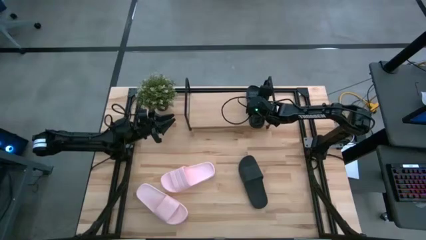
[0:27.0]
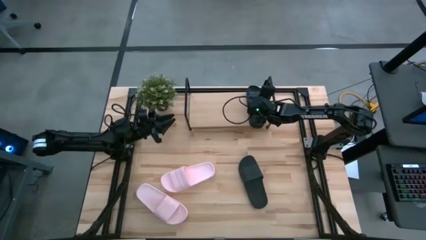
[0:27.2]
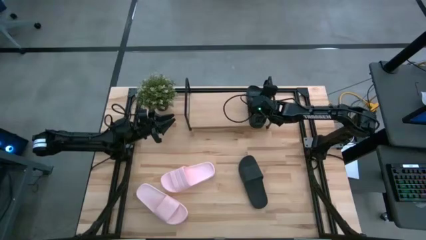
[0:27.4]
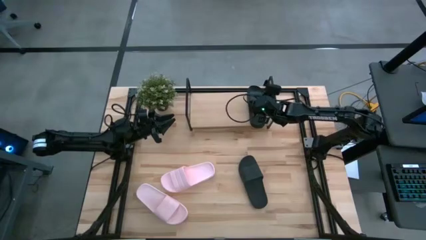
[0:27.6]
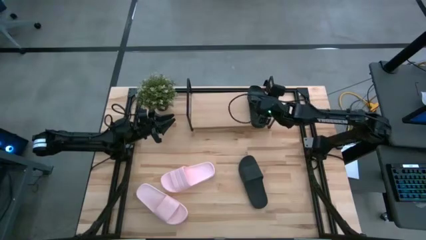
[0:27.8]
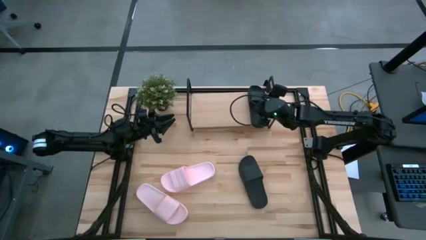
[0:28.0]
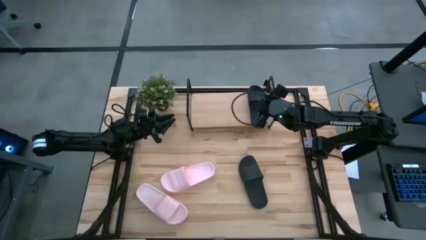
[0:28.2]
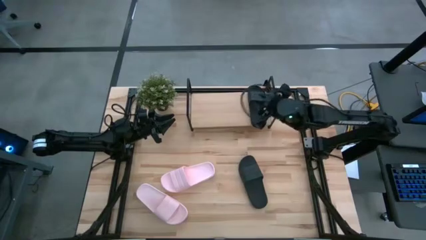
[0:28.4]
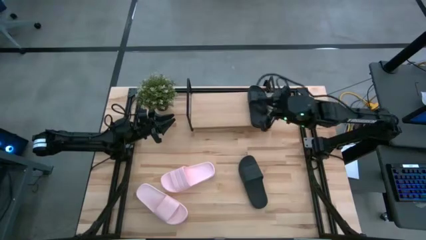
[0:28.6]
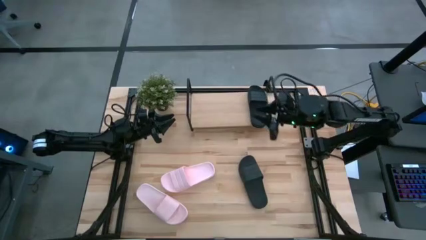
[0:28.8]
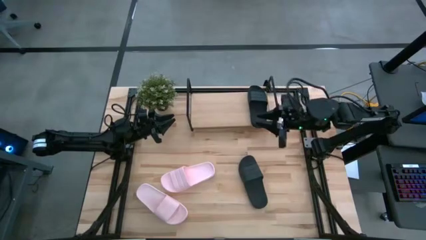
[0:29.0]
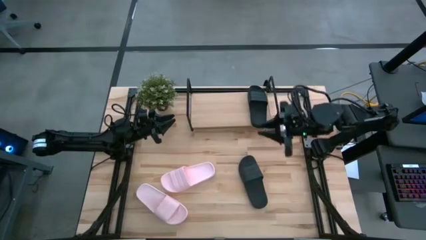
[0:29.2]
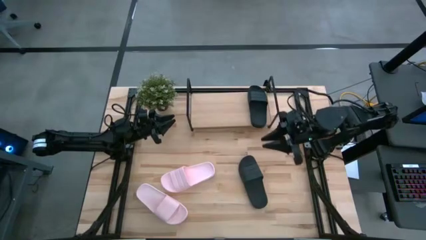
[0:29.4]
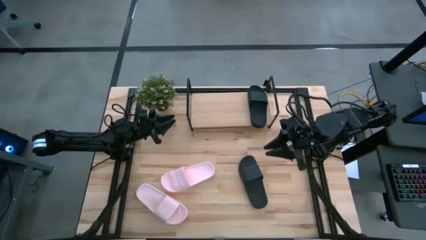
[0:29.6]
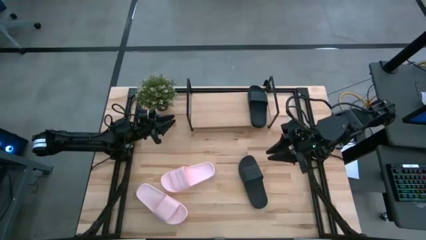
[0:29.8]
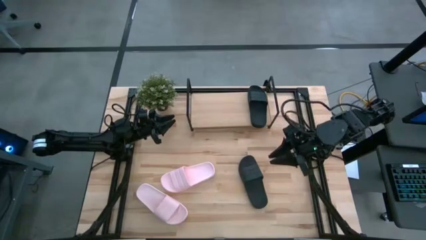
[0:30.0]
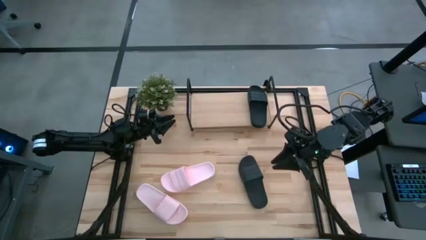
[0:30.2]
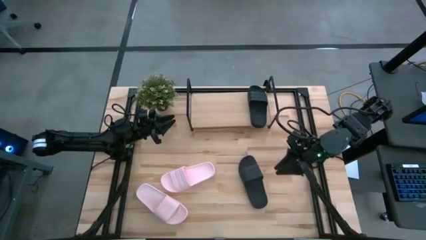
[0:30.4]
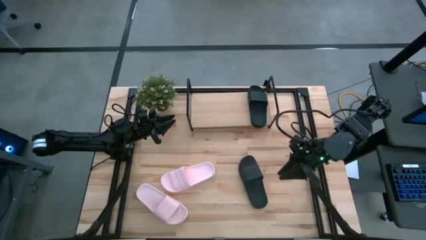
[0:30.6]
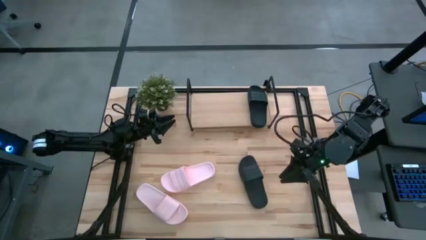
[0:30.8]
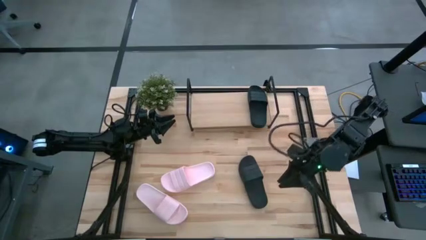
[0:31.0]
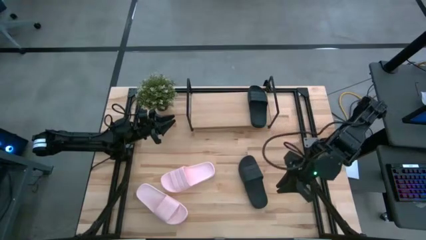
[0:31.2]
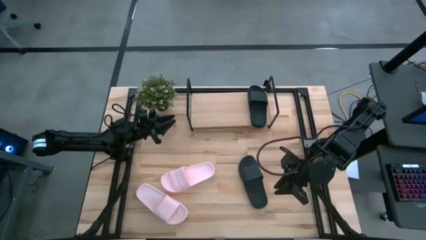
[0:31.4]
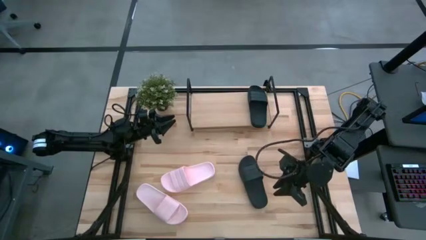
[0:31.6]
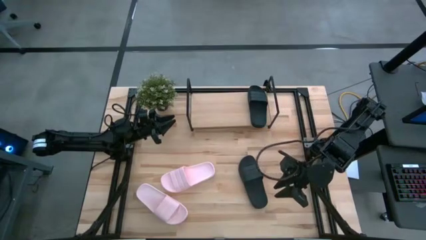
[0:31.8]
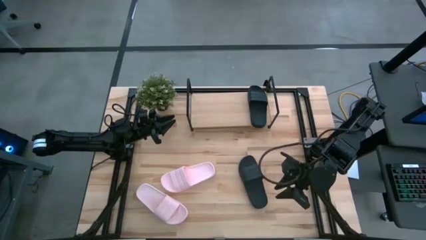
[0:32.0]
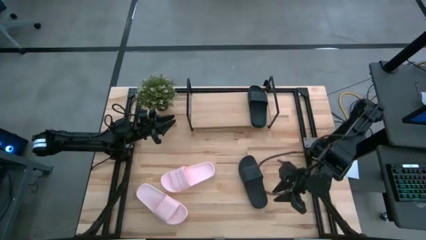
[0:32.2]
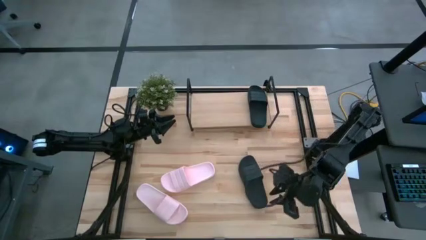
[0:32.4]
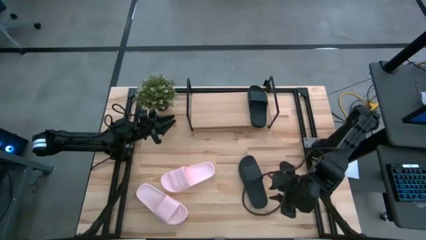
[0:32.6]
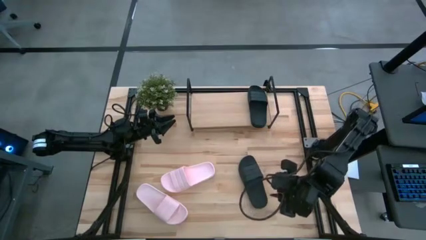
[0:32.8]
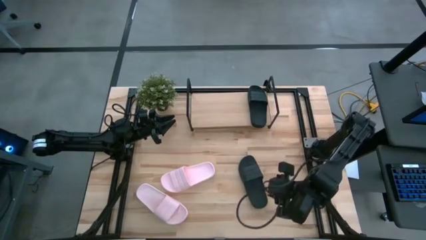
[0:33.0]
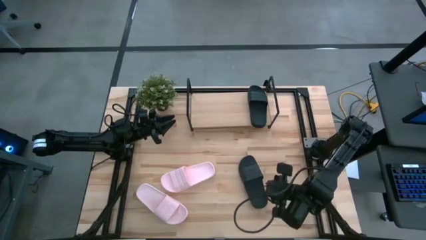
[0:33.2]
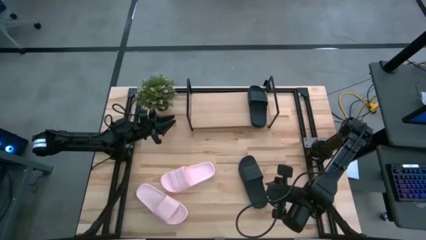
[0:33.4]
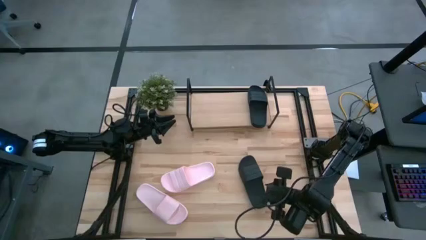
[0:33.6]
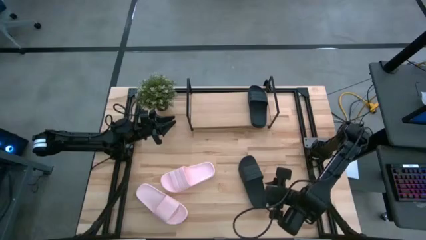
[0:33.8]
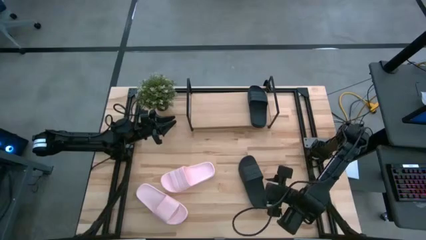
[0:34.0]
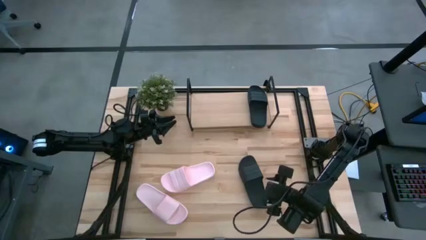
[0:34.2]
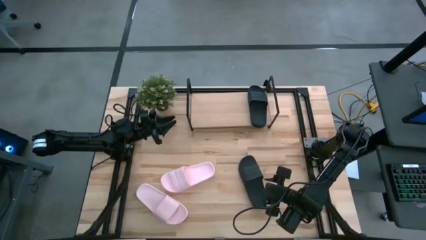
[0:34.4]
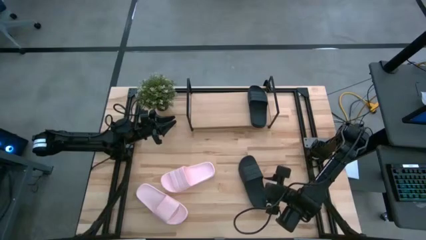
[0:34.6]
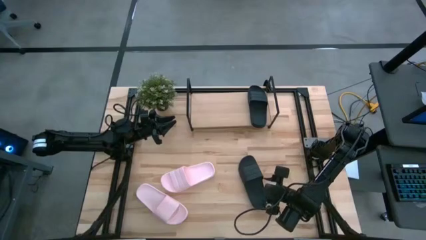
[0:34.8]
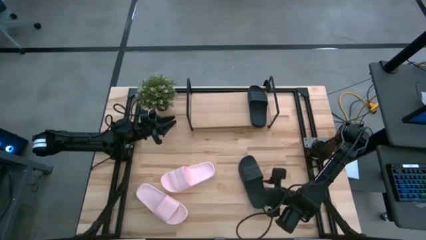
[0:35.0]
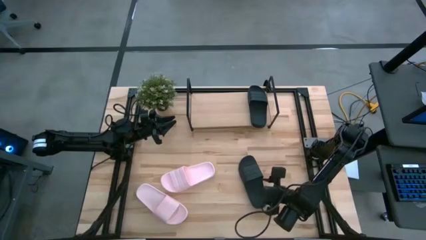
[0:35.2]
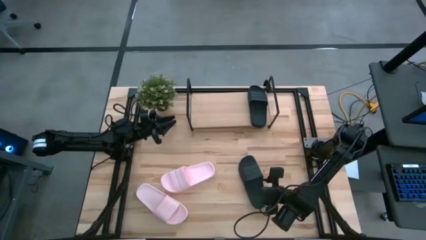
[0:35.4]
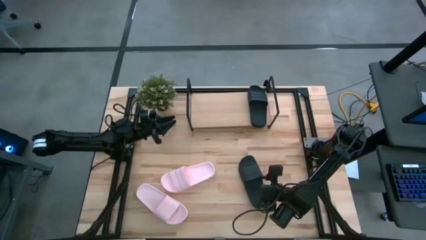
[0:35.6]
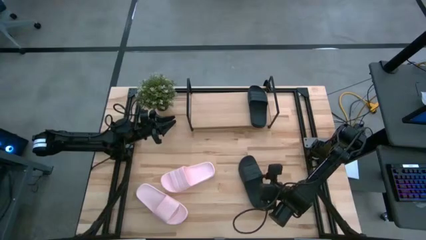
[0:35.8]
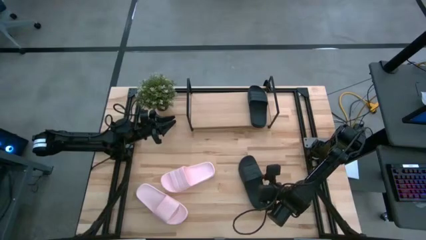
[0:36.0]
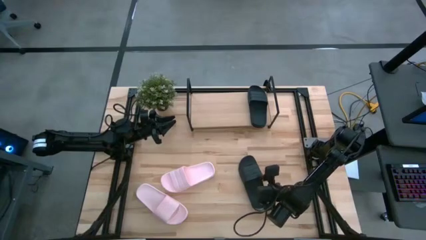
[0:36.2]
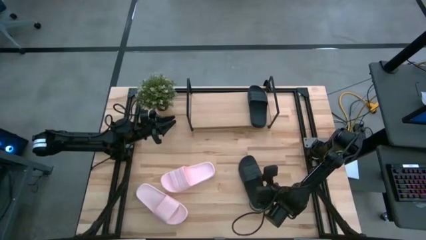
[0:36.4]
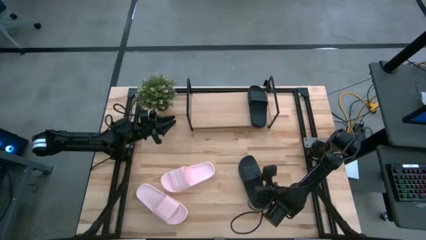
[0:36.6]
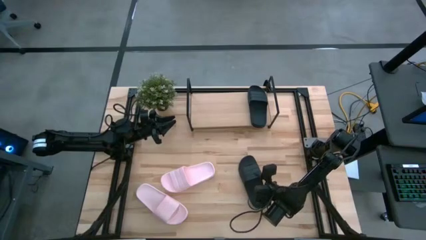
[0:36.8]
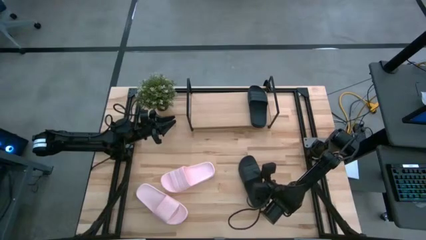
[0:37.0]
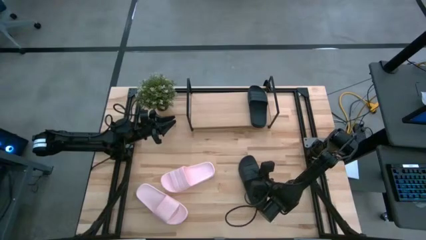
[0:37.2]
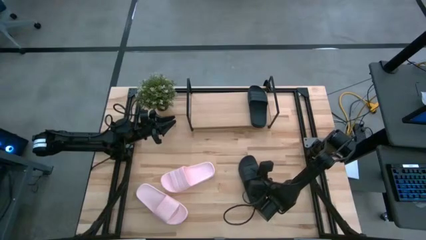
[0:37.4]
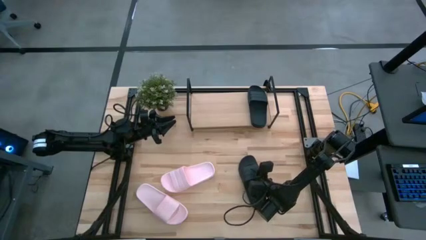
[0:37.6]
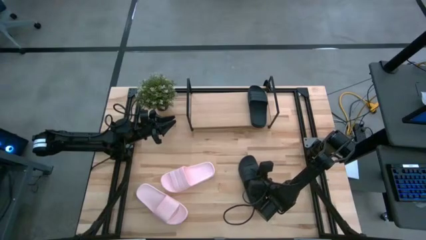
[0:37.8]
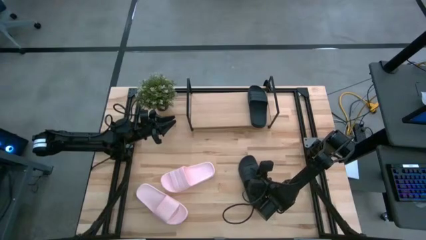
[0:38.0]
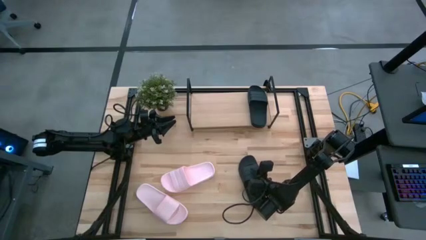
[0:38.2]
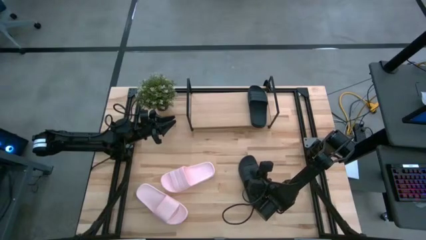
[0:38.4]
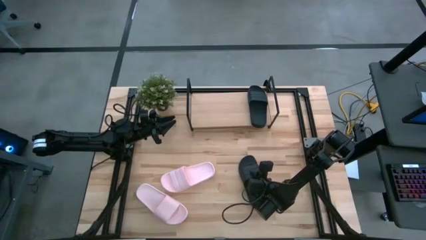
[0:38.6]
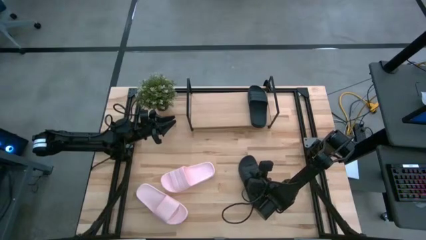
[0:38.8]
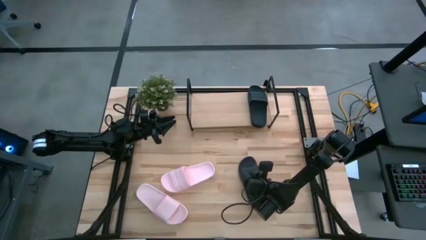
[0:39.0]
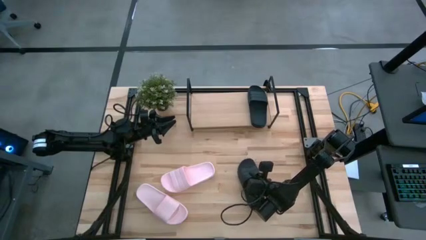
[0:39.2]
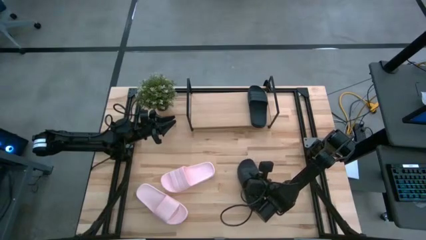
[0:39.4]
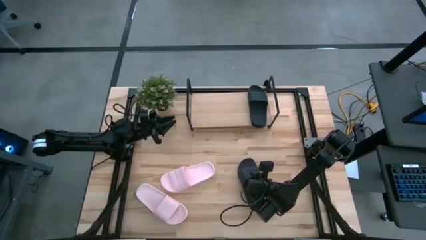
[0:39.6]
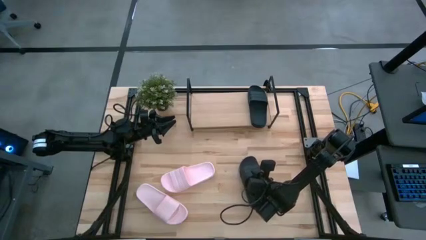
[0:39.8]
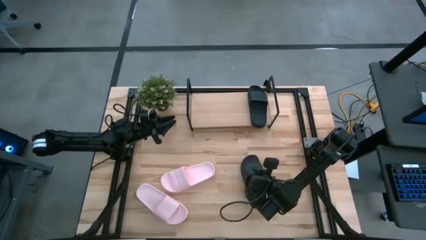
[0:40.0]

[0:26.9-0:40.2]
Task: Pick and place slides into the shelf
Put the black slipper on the shelf
